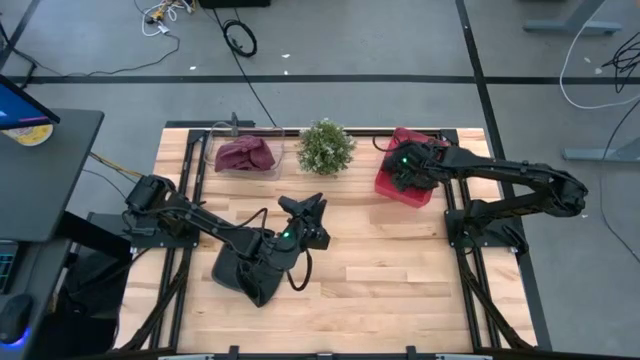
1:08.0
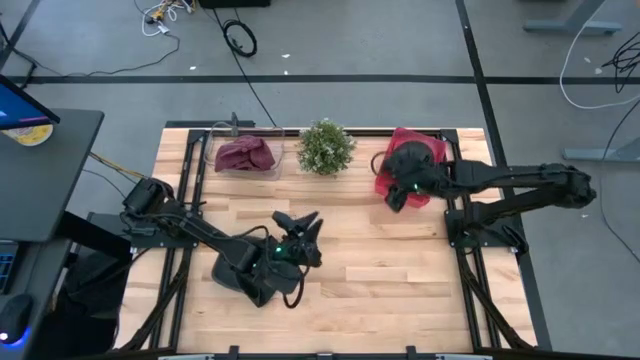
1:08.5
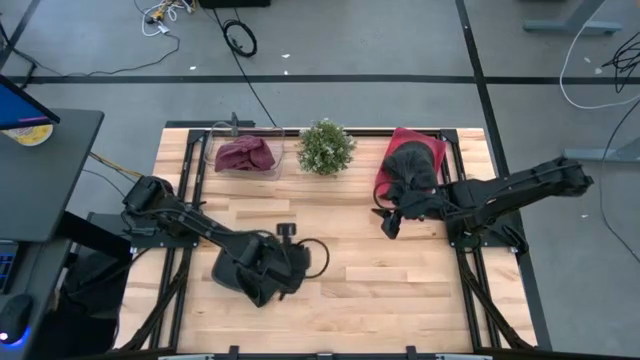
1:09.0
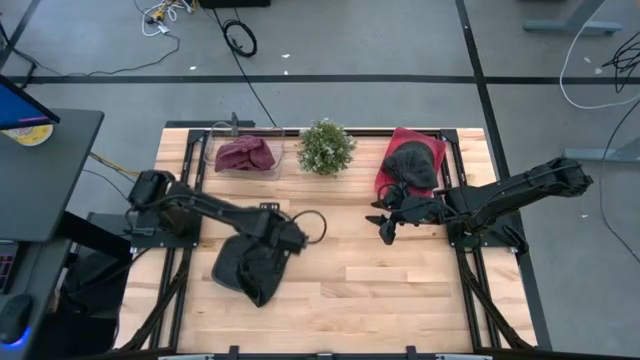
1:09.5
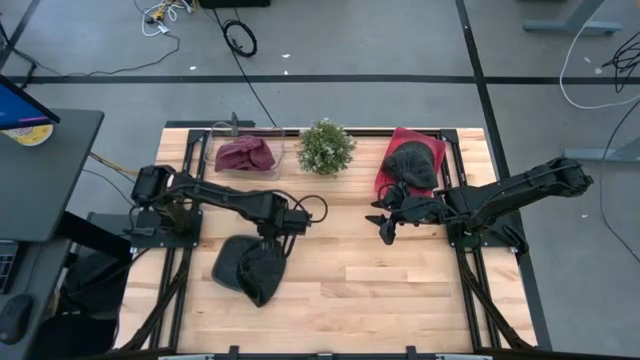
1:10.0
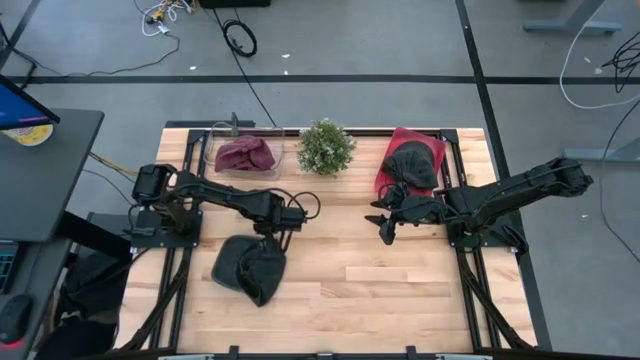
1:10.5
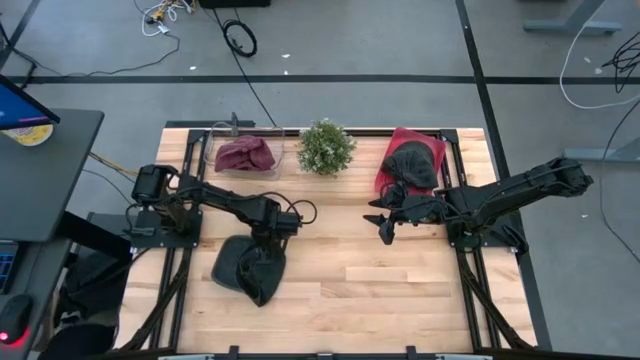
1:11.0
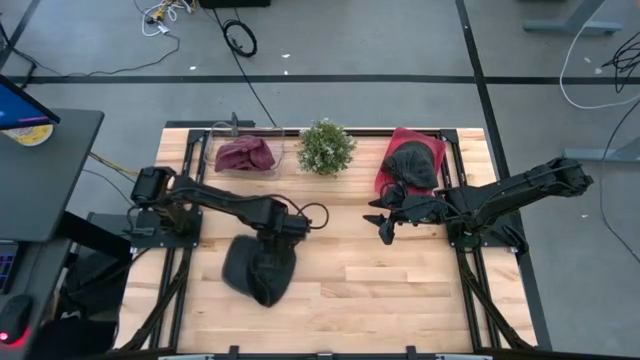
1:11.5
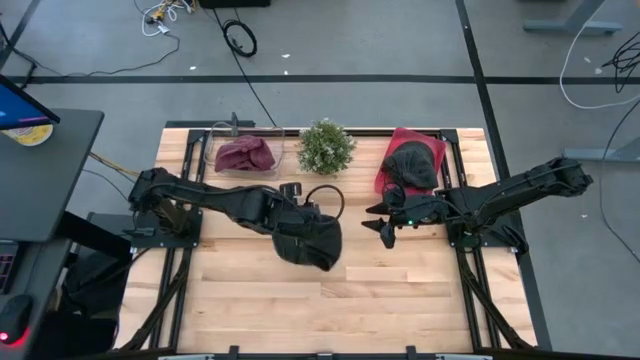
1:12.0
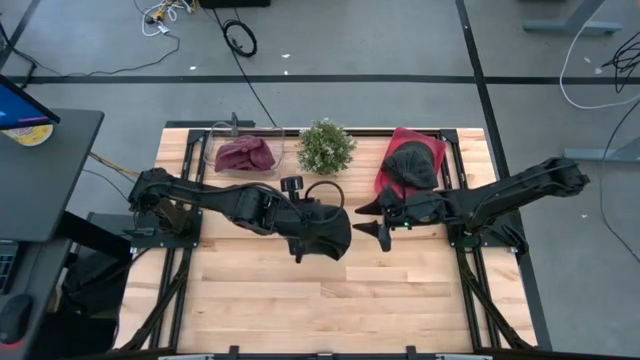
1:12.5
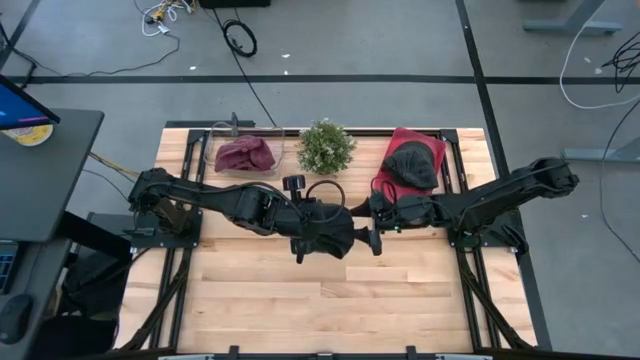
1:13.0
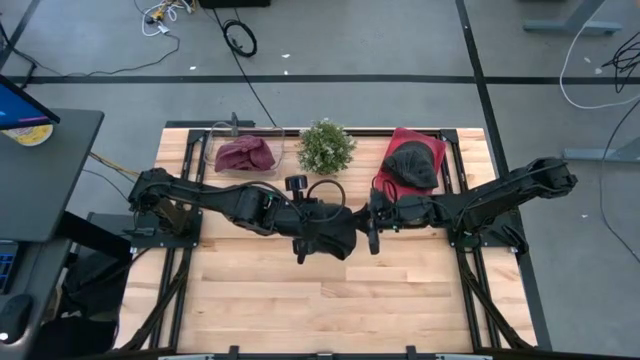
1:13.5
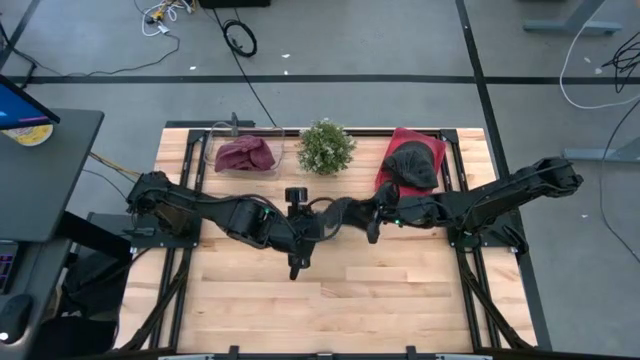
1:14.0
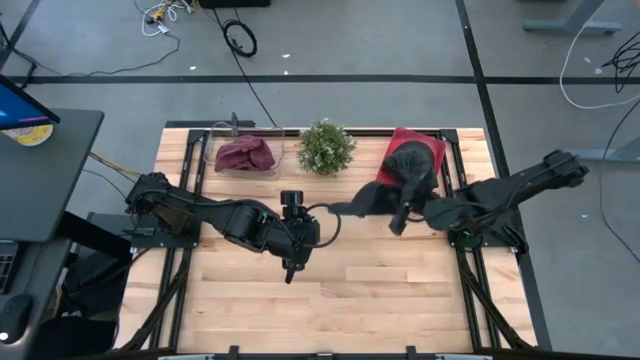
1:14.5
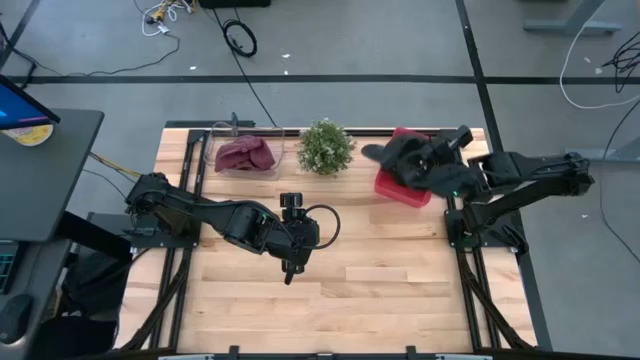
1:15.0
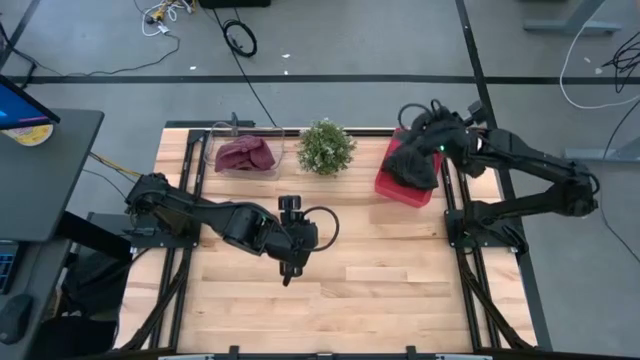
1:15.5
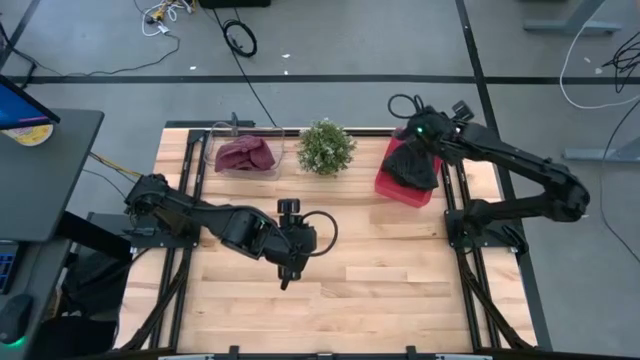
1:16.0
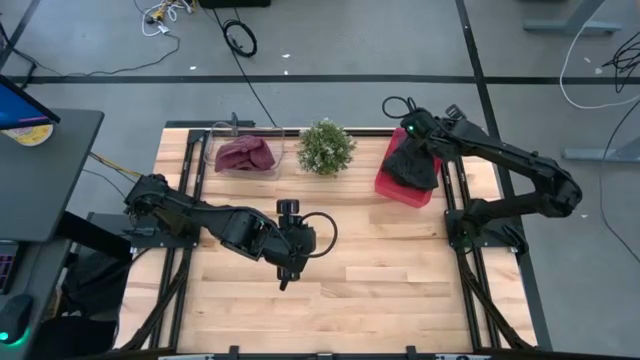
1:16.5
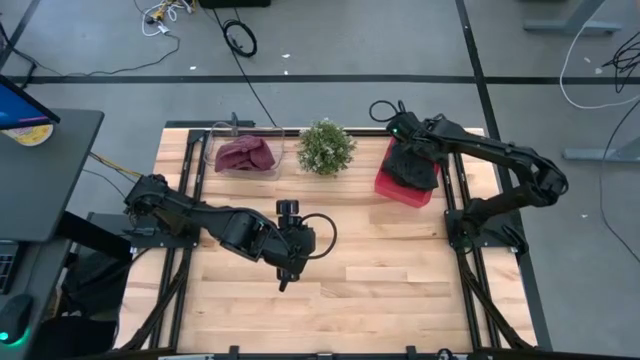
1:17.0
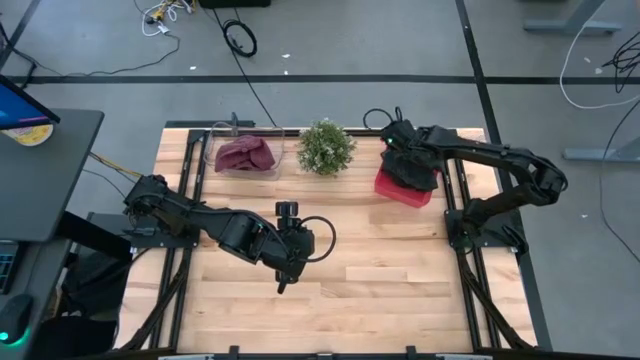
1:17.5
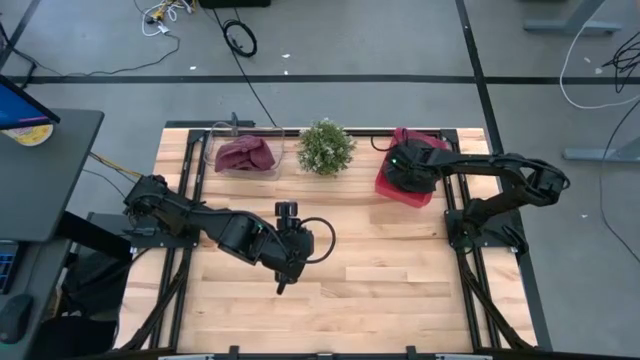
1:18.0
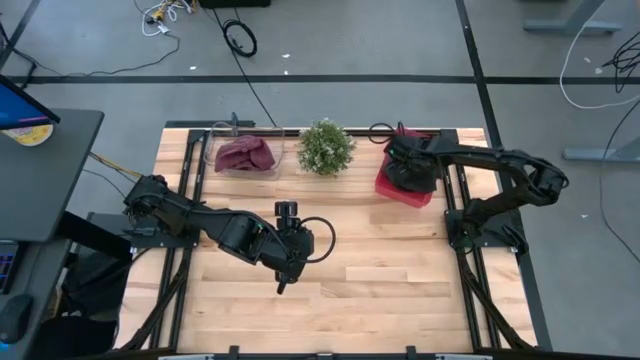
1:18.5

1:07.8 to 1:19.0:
Task: Pick & Place hat
Put the black cap into the red bin

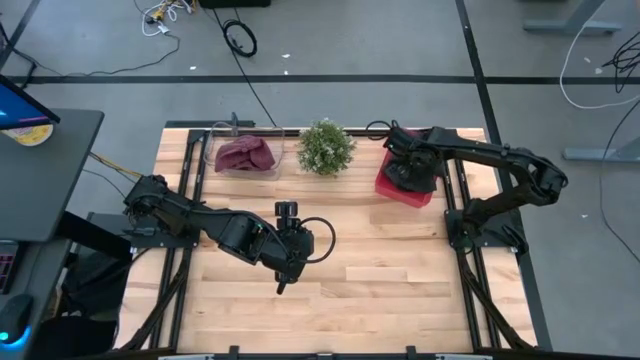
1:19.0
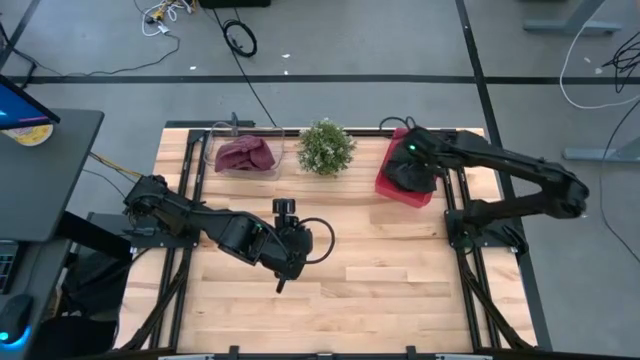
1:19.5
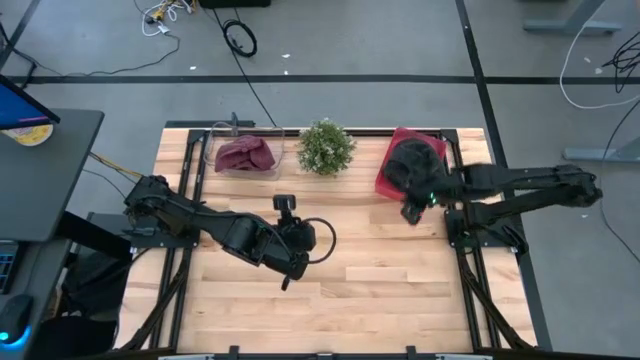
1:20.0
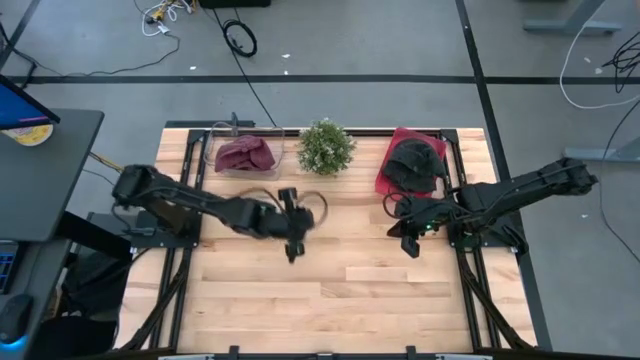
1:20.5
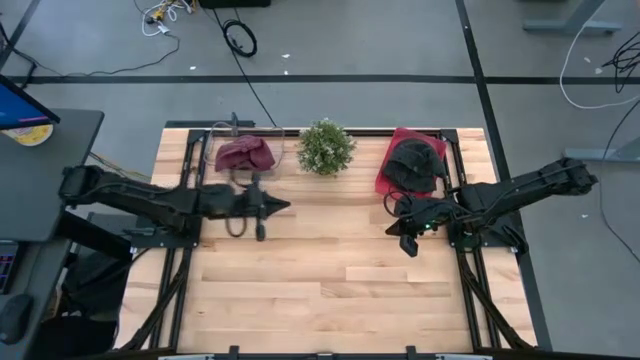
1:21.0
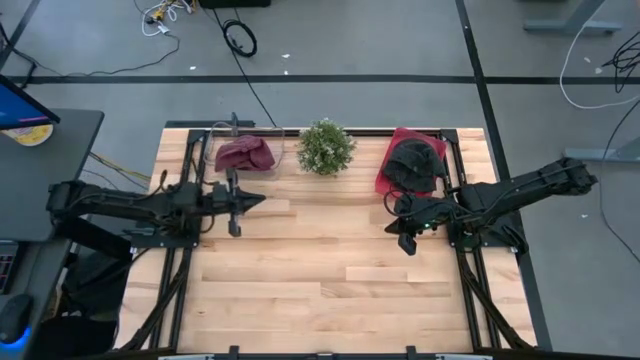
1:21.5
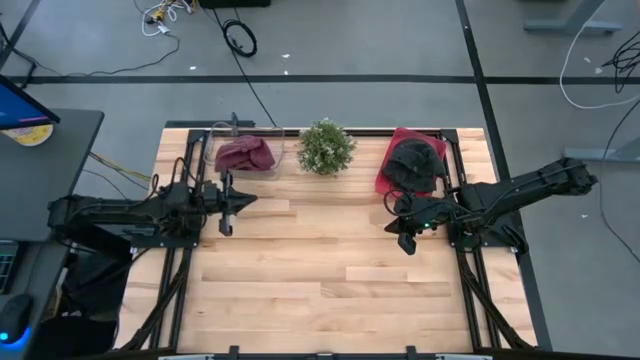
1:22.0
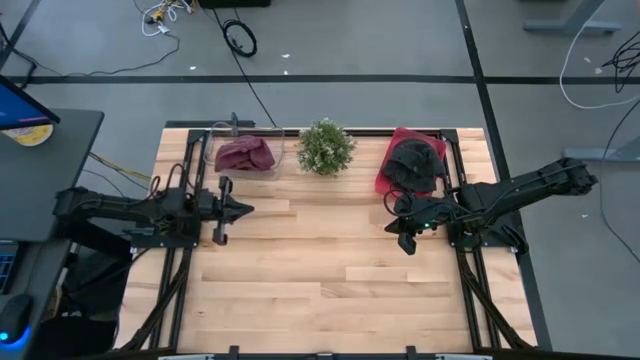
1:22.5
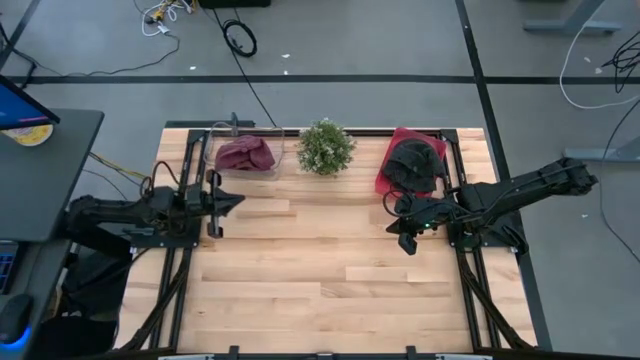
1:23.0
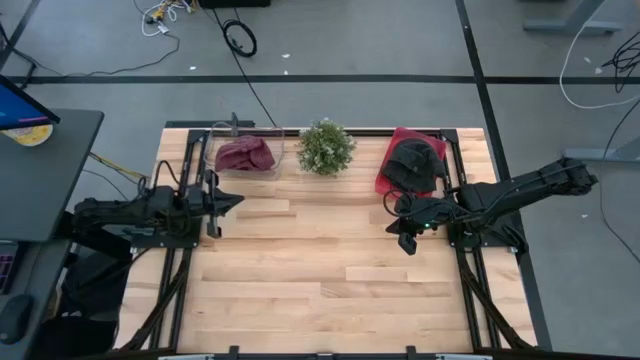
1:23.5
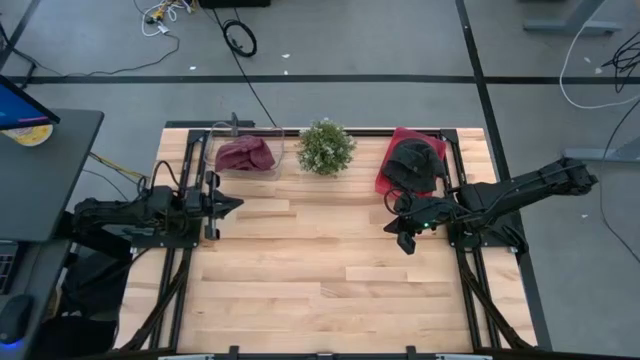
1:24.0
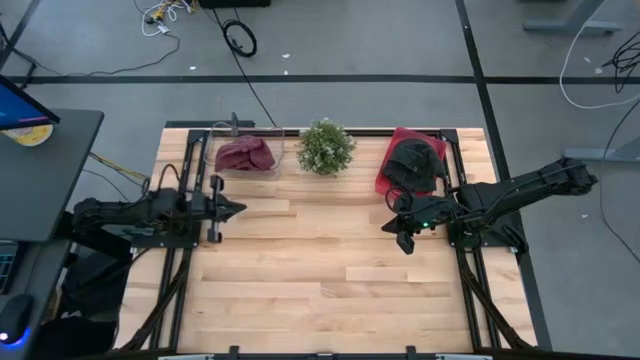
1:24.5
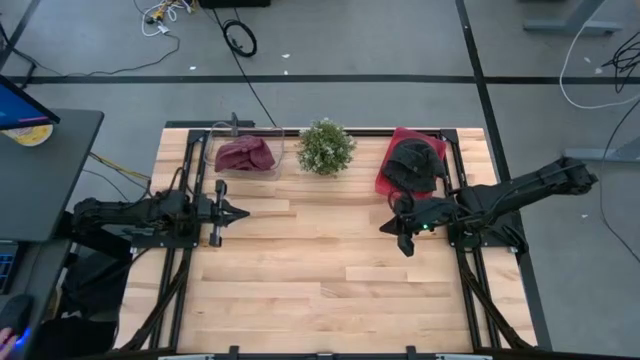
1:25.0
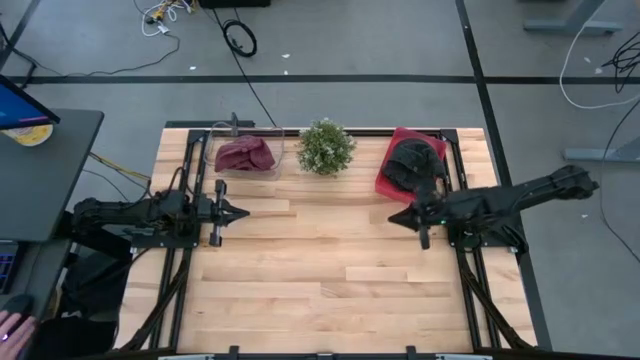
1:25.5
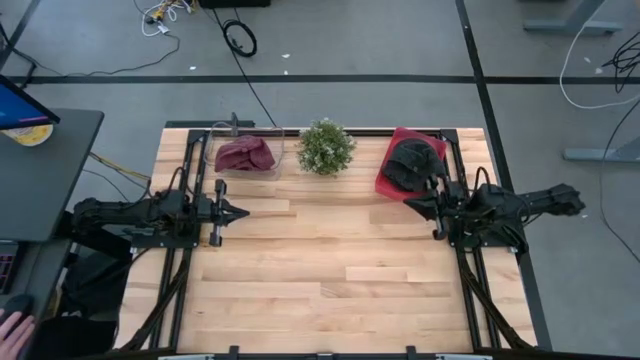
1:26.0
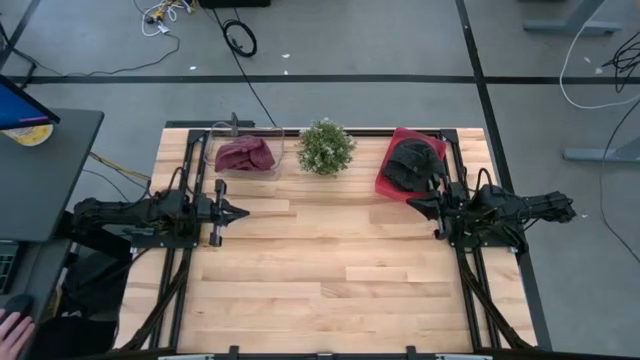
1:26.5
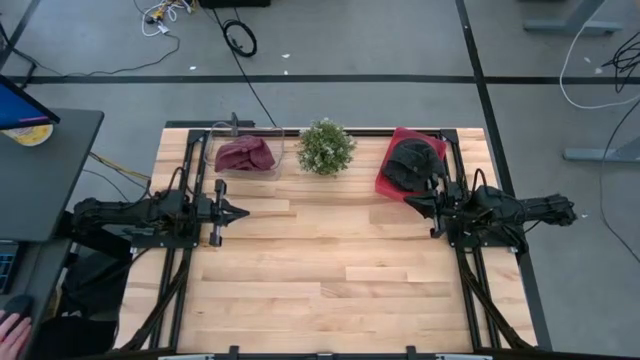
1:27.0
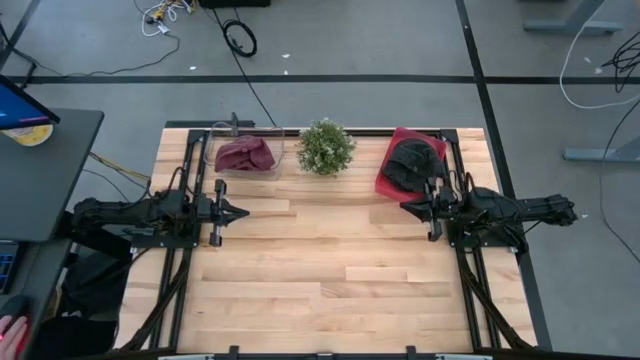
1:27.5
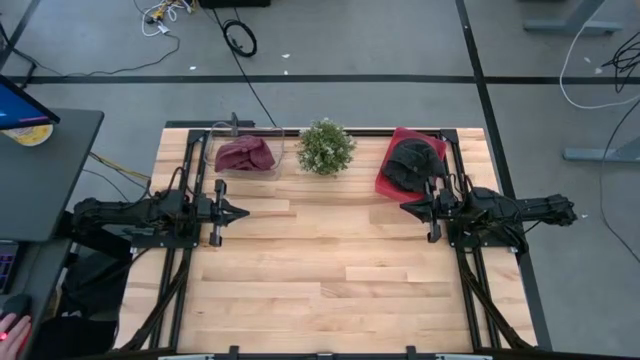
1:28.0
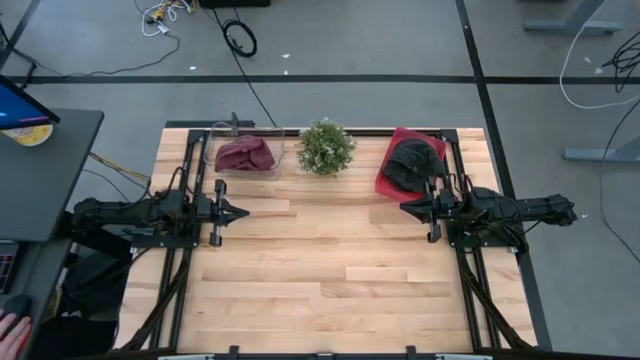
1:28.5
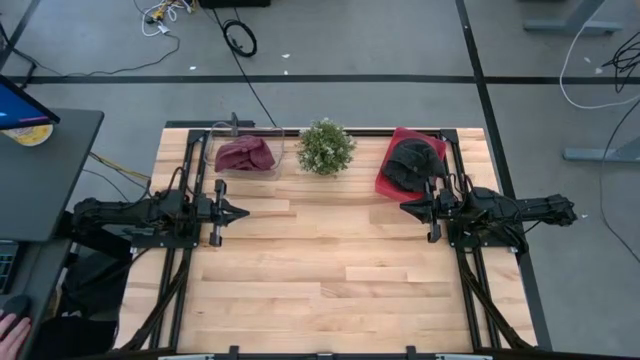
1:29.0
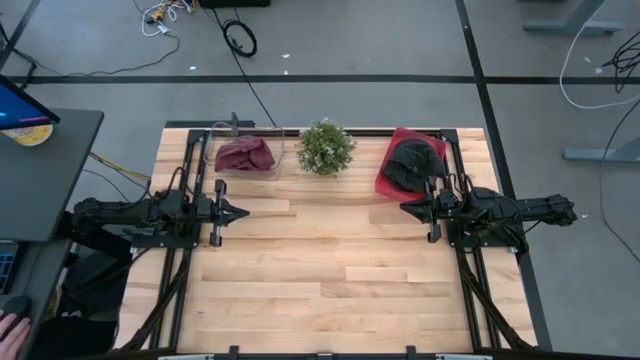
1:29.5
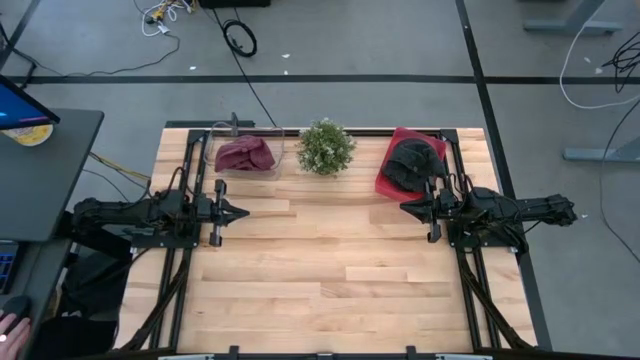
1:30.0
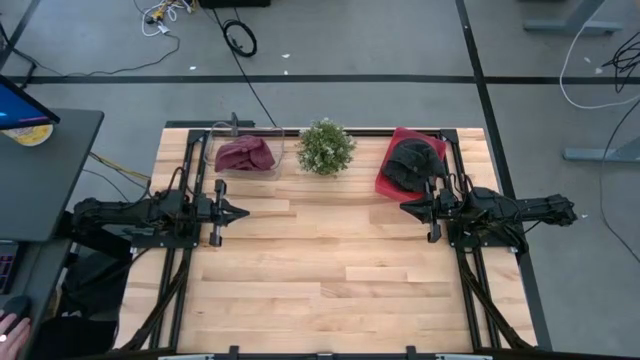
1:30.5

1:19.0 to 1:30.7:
Return to Home Position
